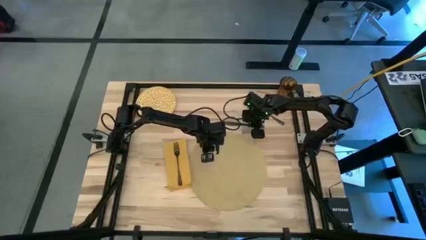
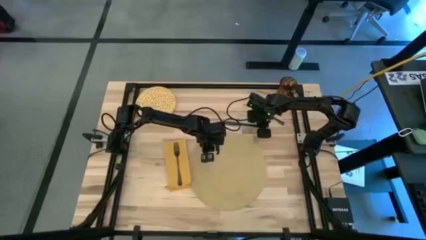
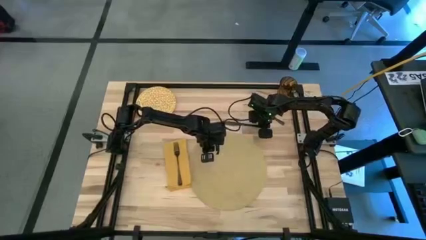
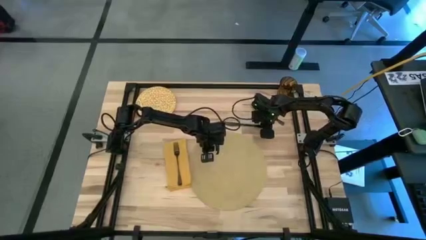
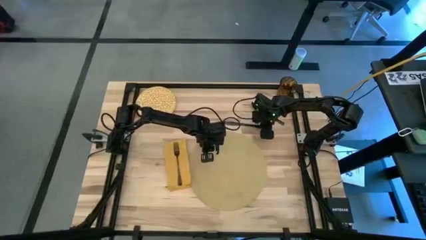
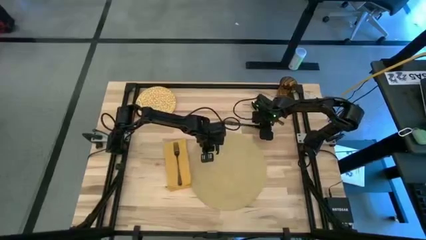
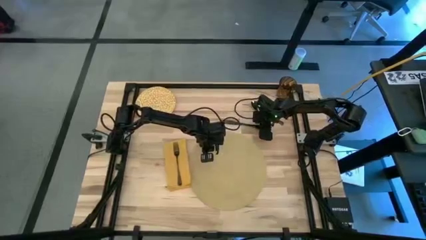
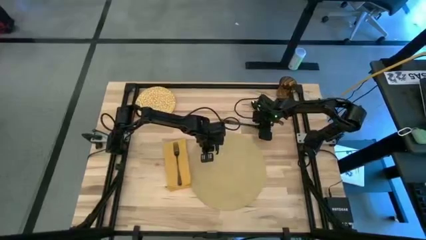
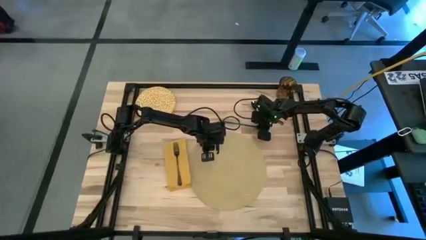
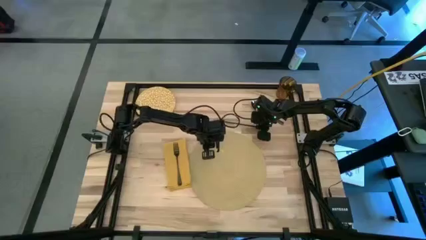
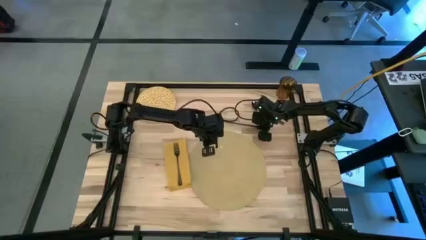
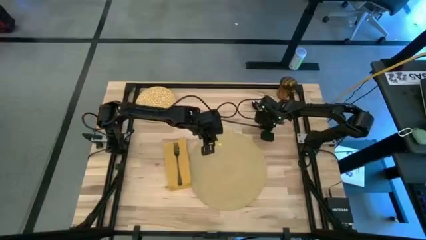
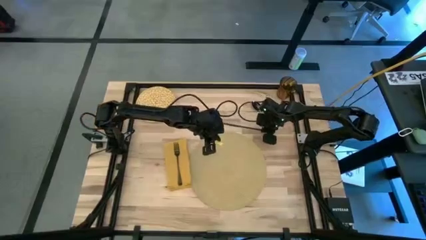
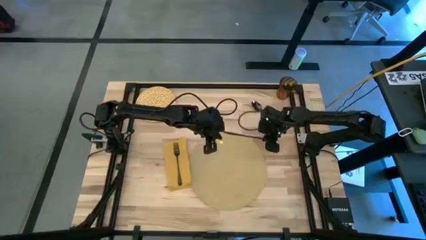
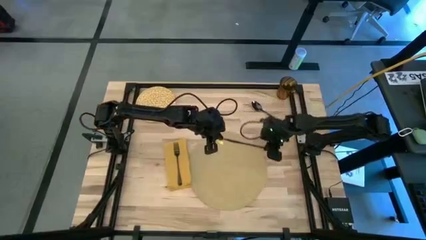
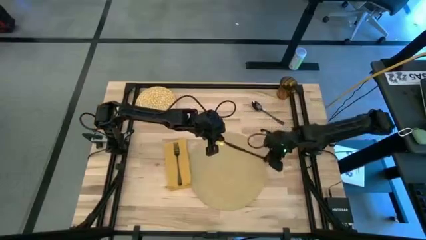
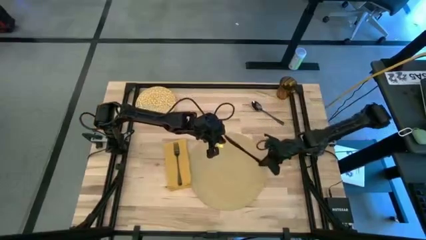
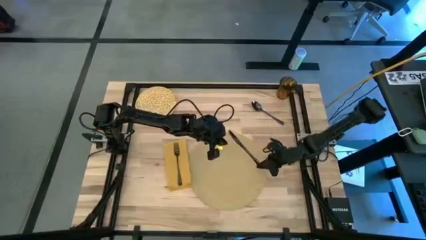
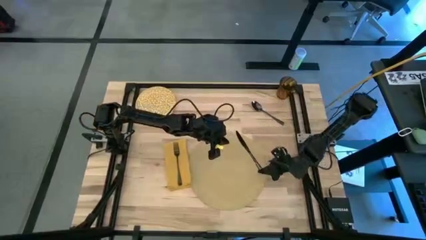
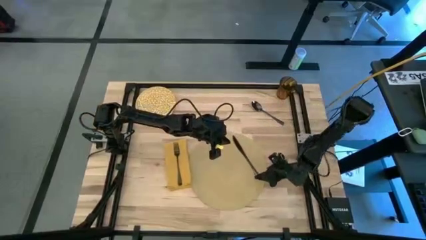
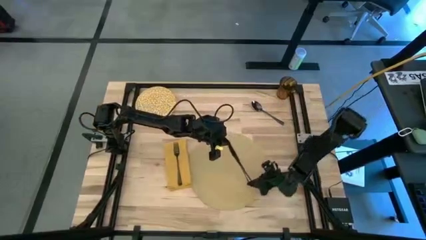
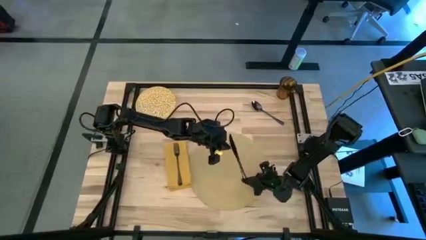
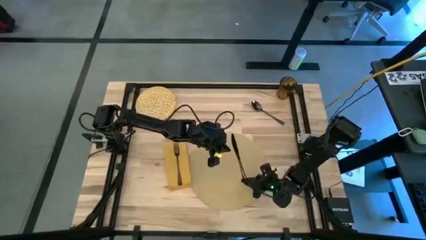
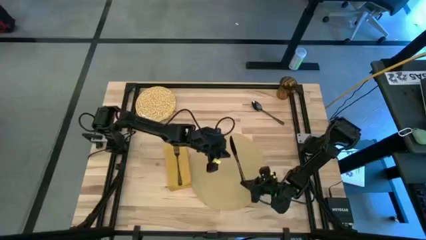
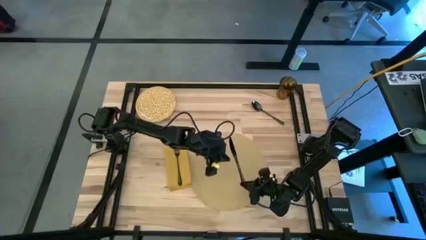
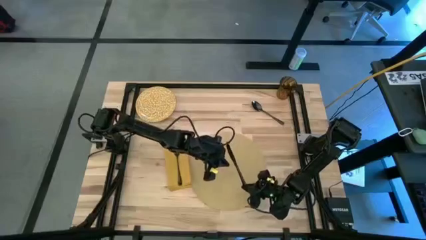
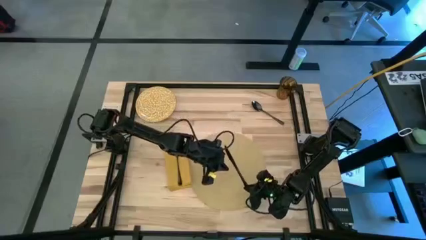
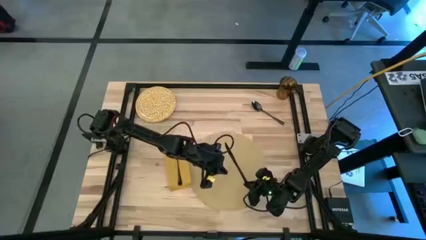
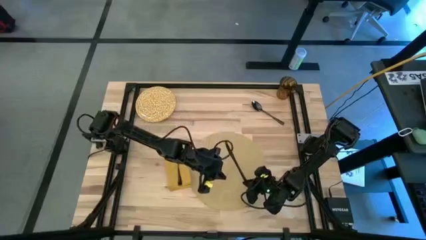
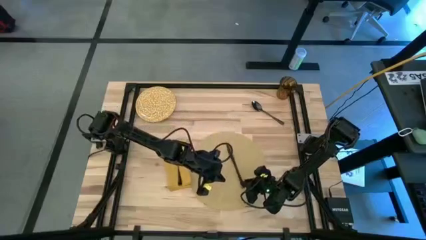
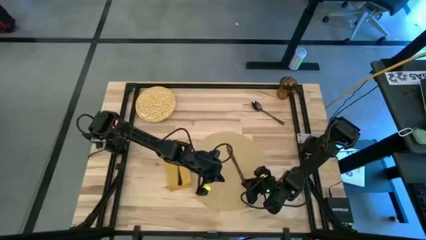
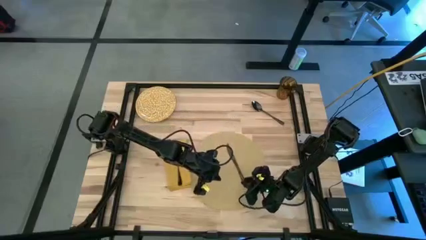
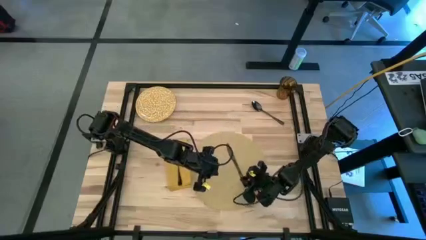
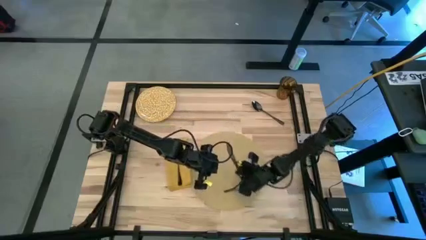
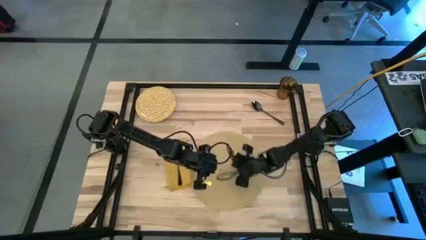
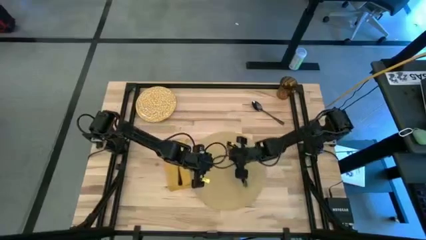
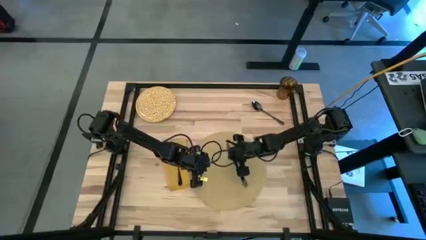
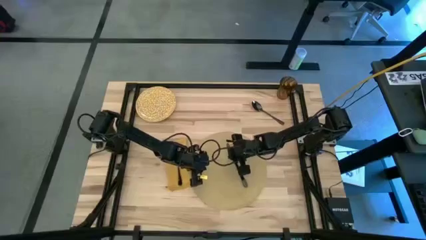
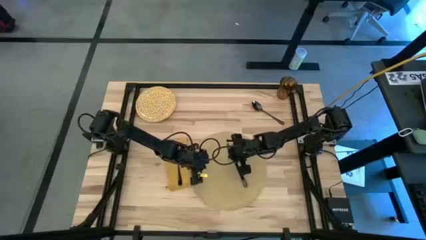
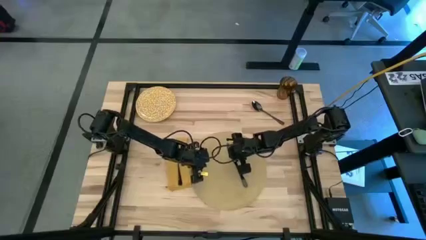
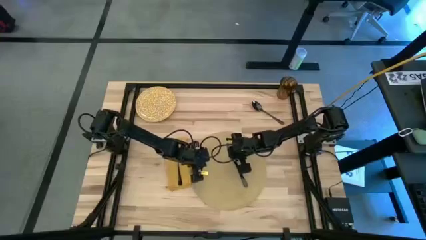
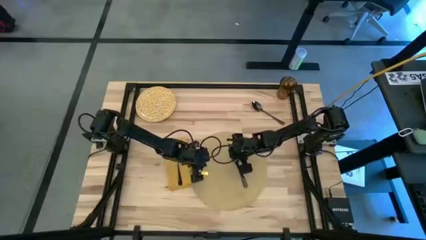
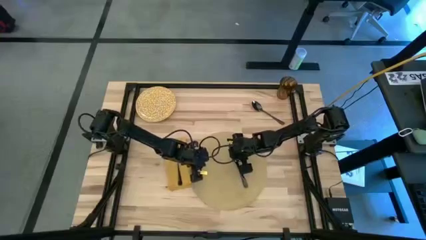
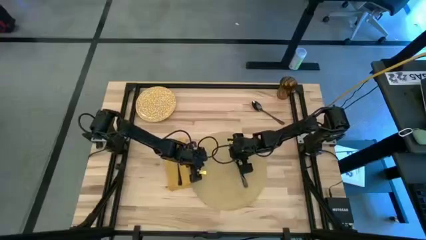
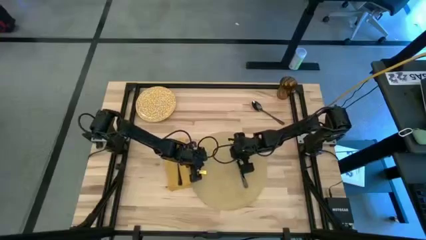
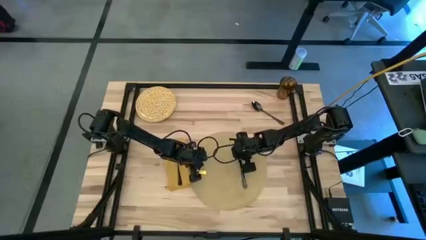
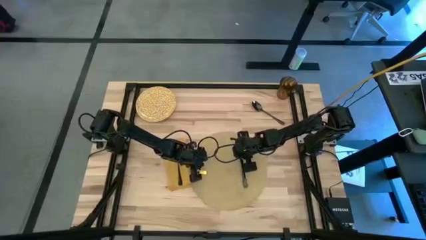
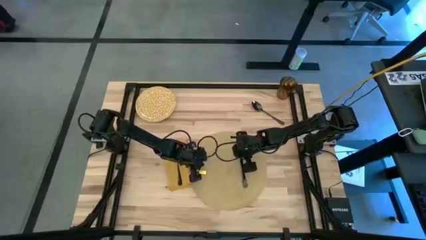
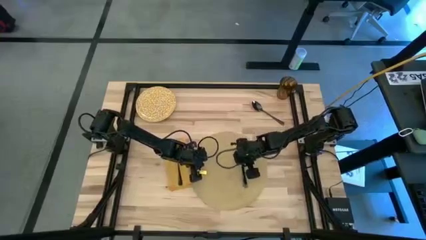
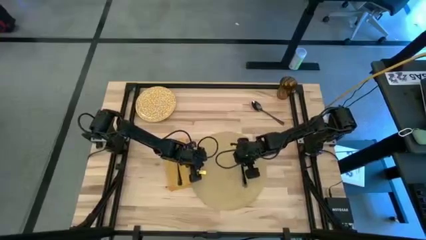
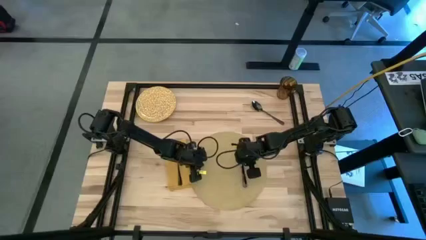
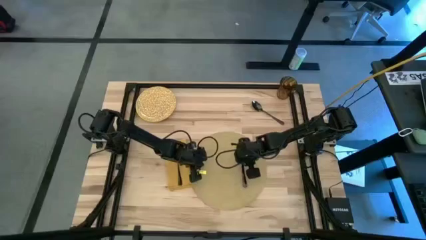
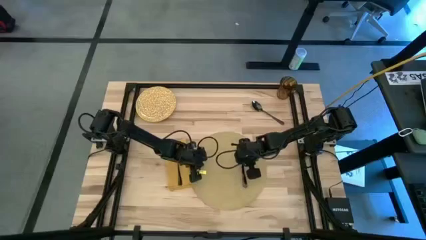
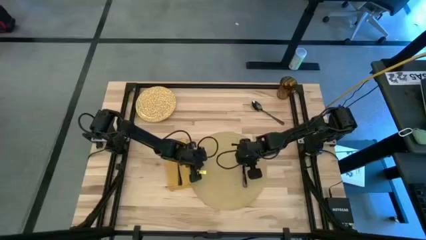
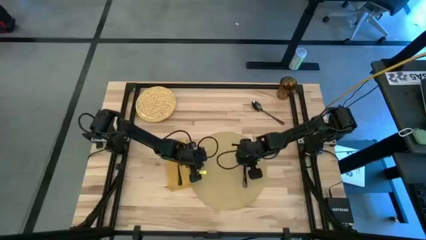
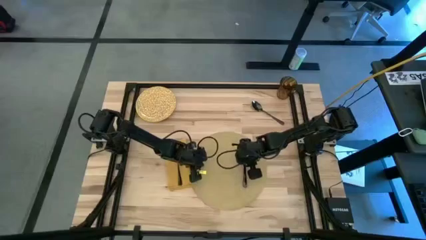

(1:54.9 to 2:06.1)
Task: Set table place
Put the black table knife on the right of the yellow placemat

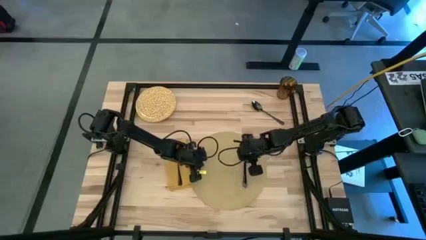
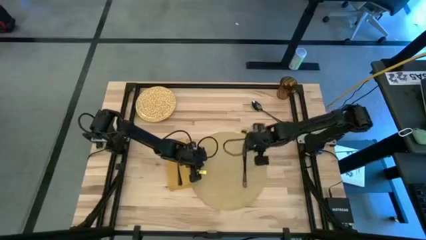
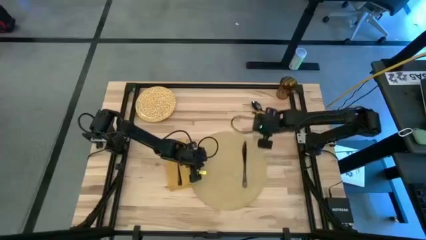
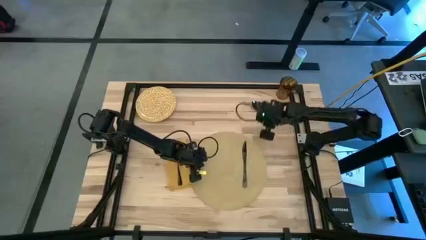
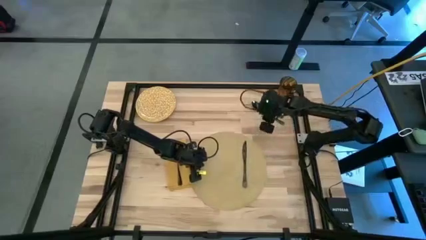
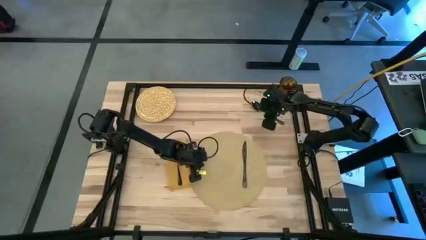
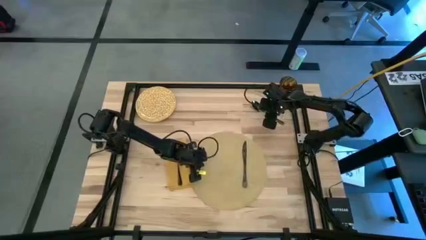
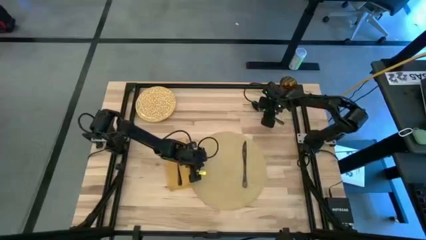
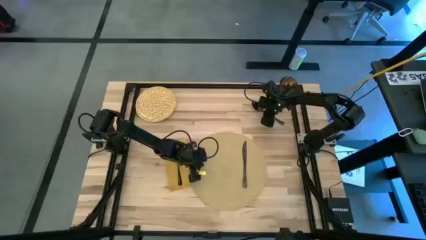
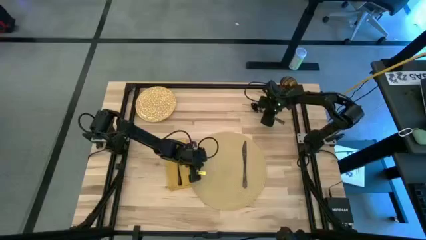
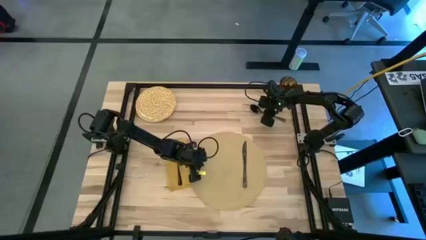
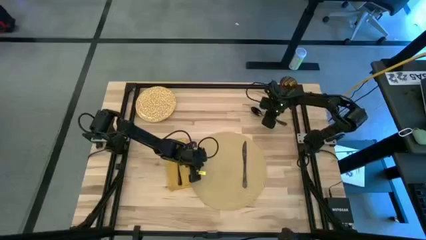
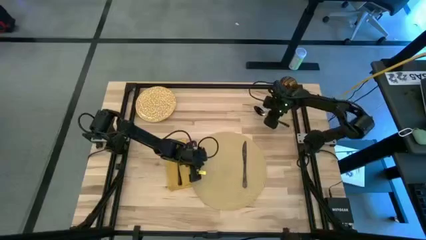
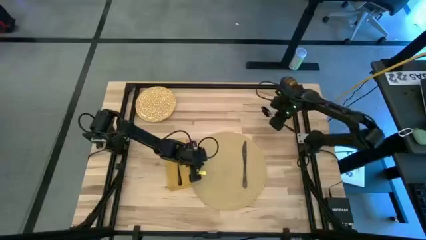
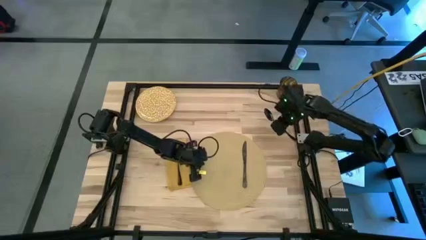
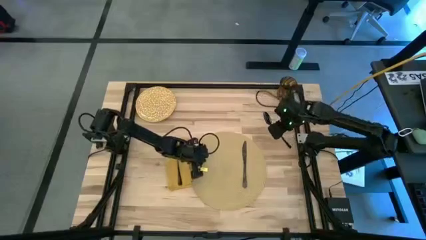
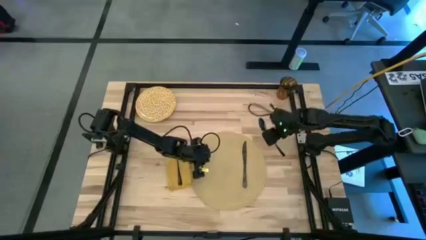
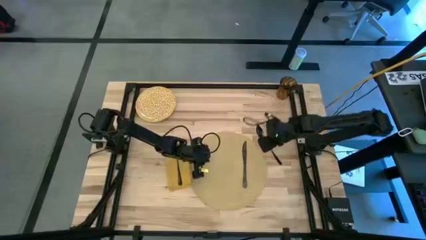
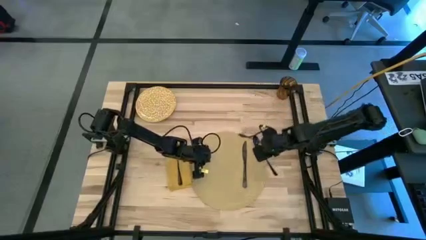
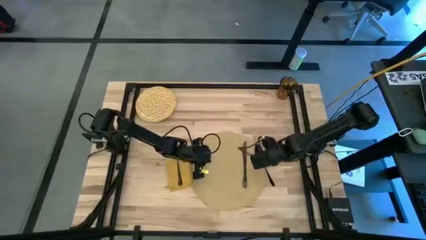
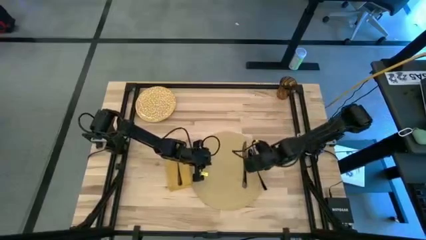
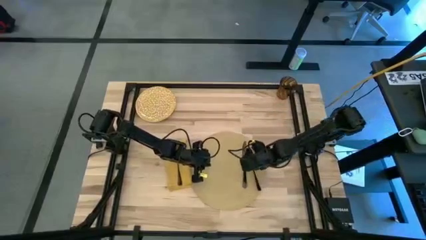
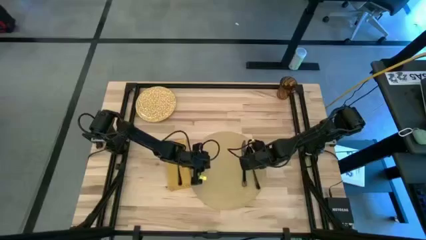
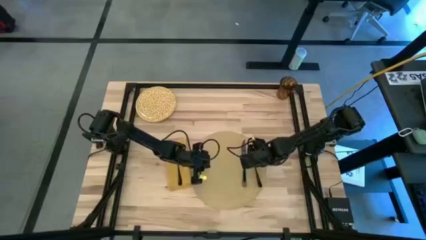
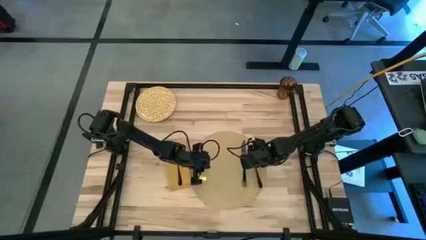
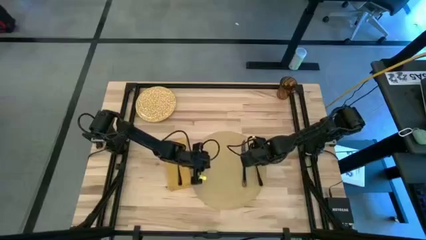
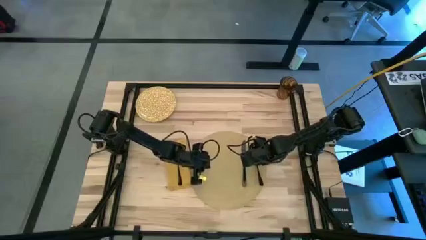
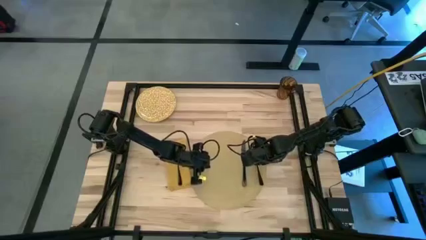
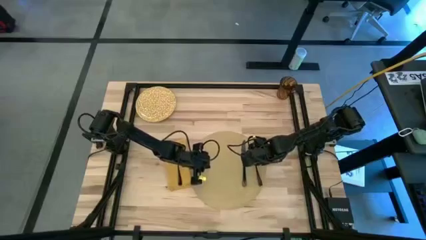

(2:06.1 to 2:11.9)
Put the black spoon on the yellow placemat to the right of the black table knife
